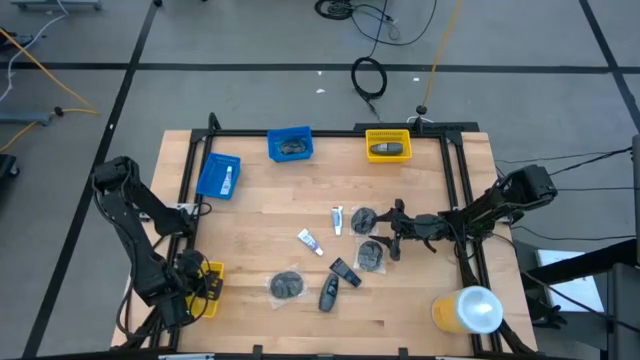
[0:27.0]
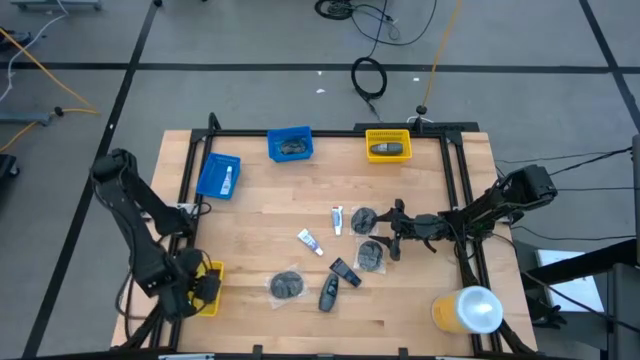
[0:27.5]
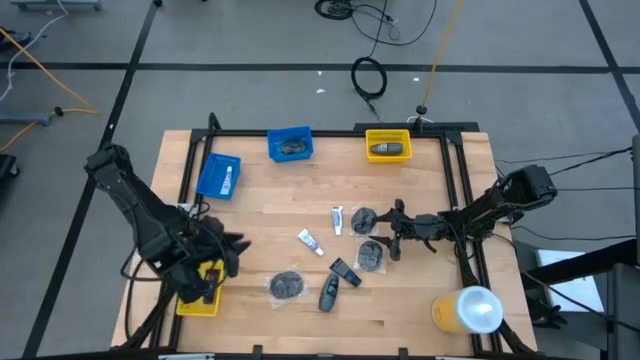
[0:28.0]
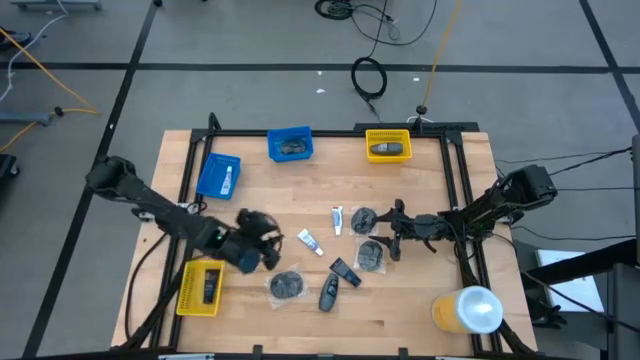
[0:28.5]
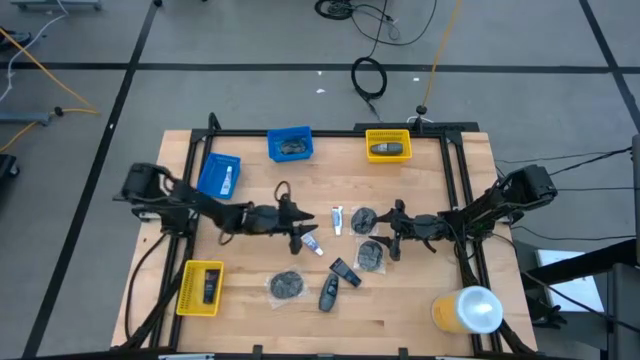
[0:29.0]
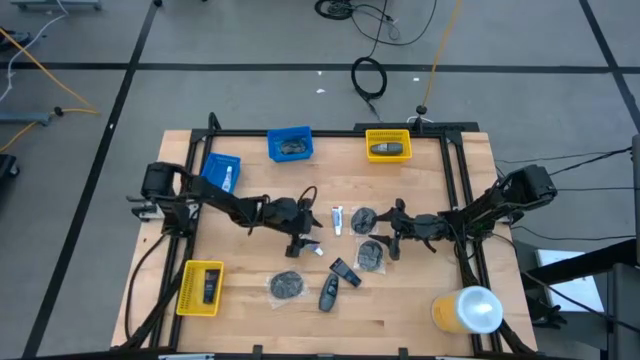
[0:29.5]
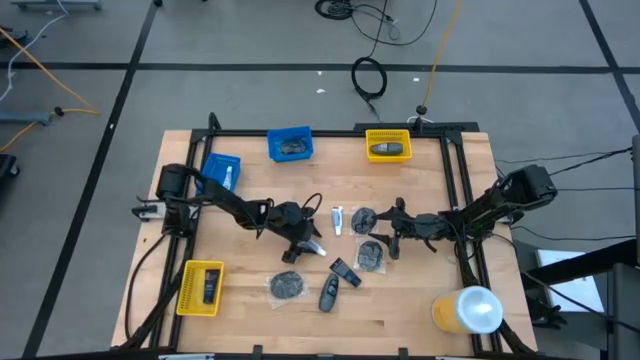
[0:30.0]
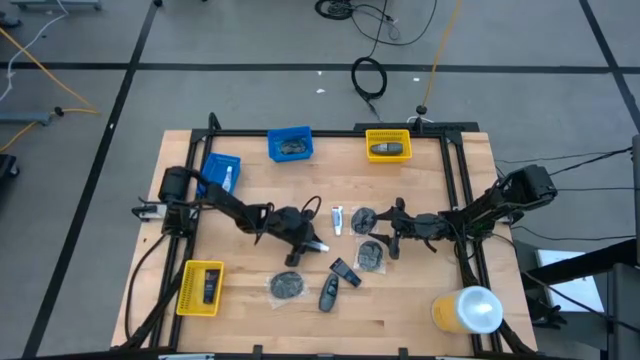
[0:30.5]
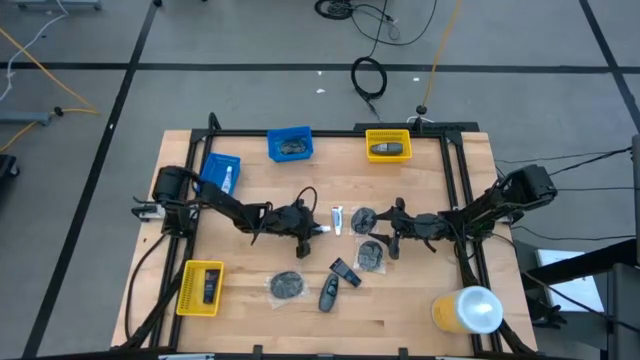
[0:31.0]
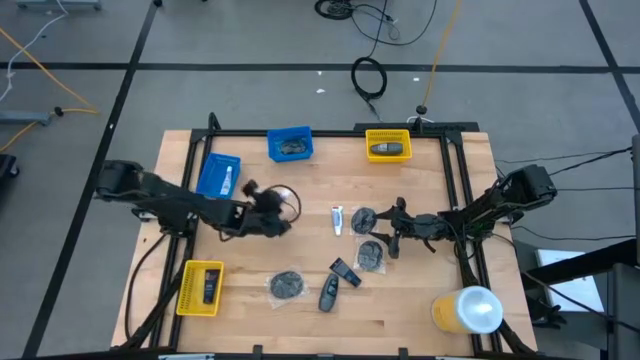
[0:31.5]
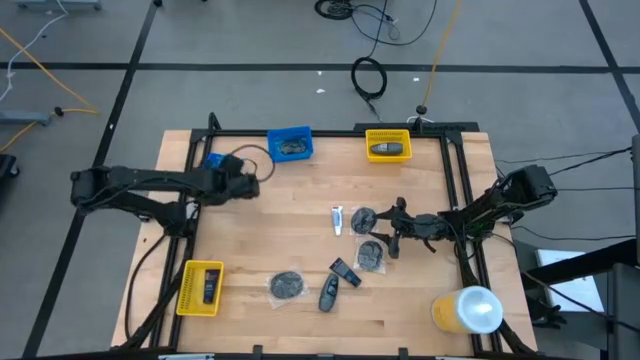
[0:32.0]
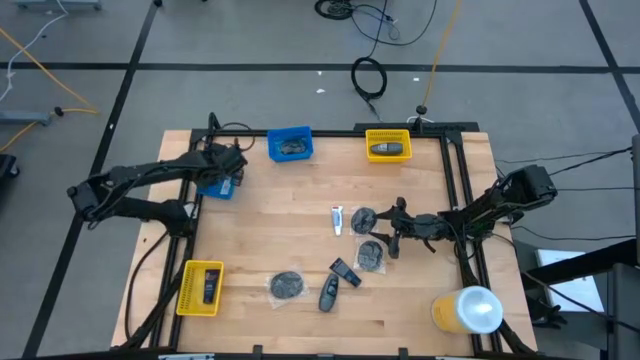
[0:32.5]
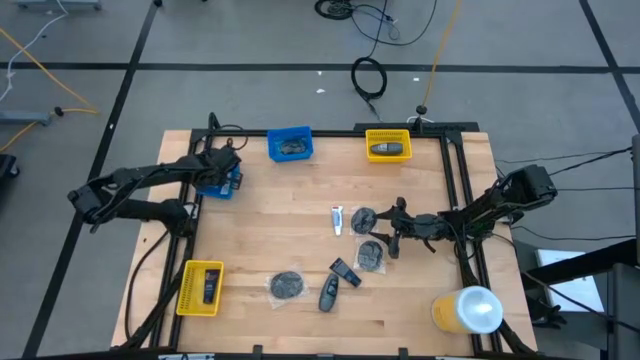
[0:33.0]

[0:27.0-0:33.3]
Task: Pick & Place Travel size toiletries
Put the white toothpaste into the left blue bin

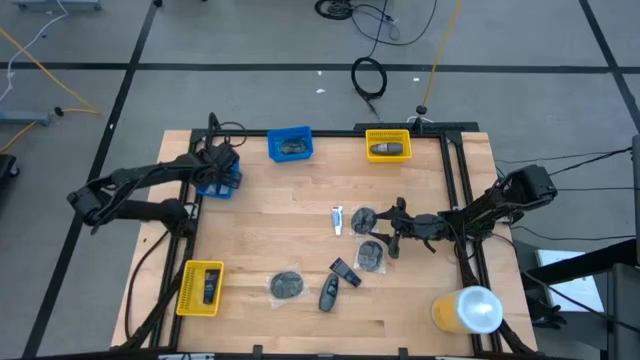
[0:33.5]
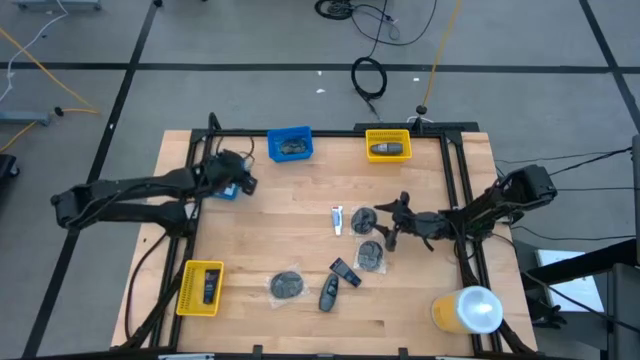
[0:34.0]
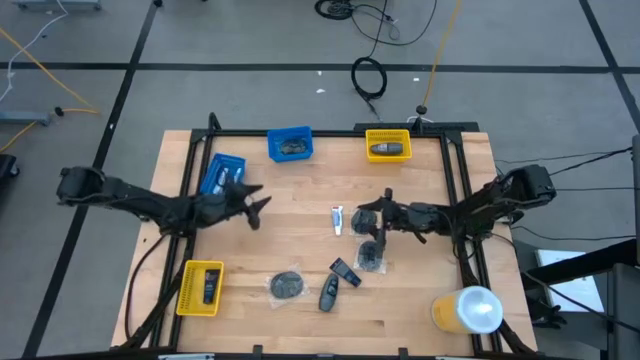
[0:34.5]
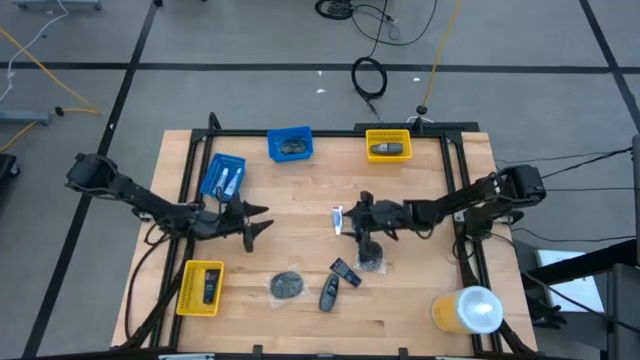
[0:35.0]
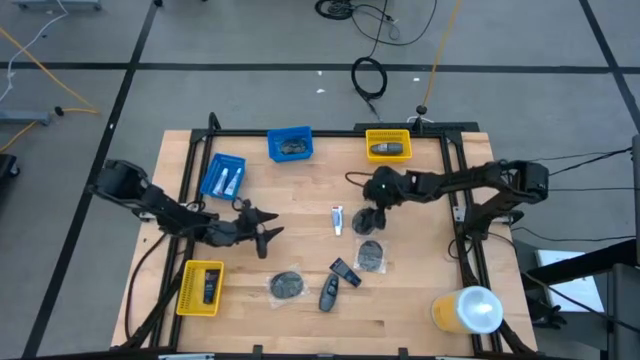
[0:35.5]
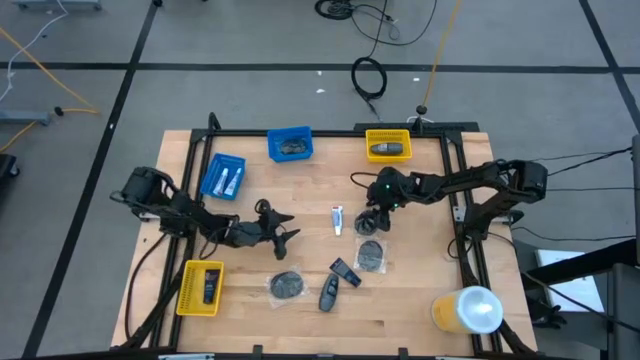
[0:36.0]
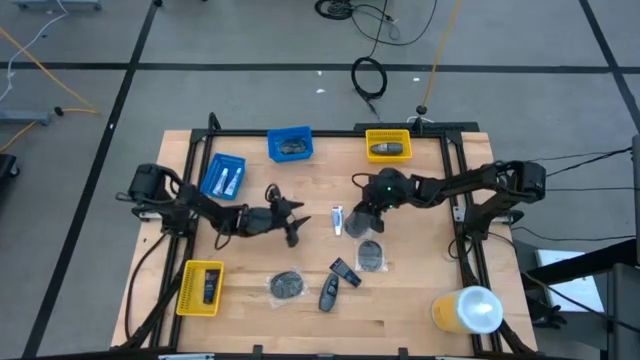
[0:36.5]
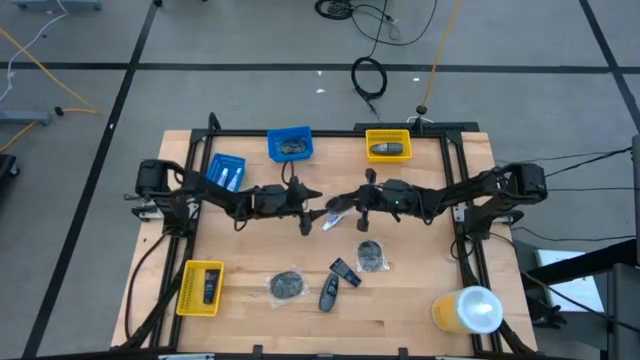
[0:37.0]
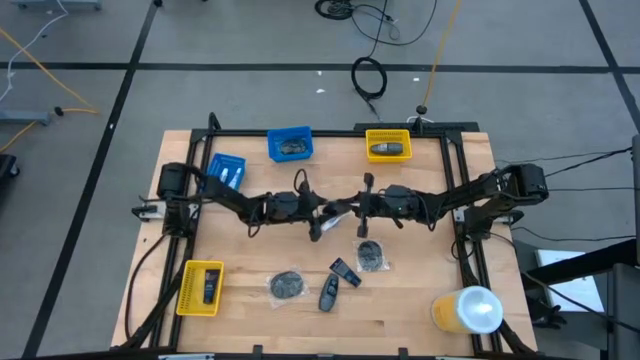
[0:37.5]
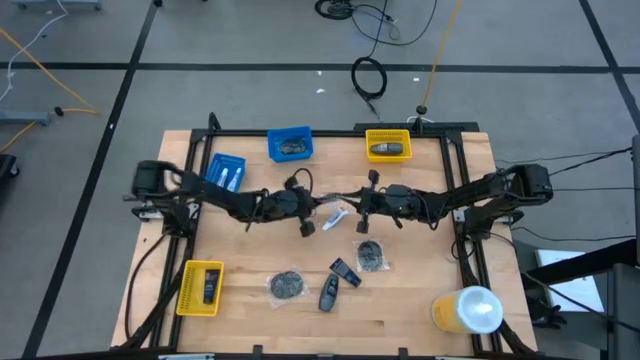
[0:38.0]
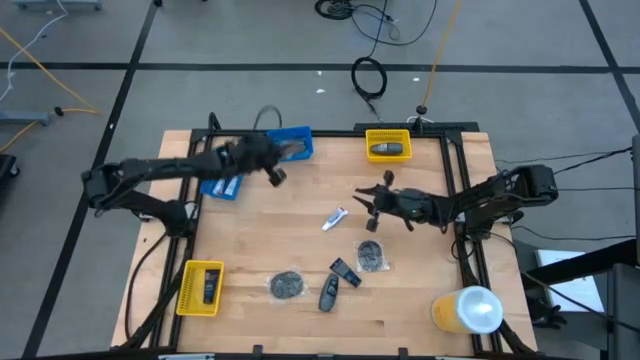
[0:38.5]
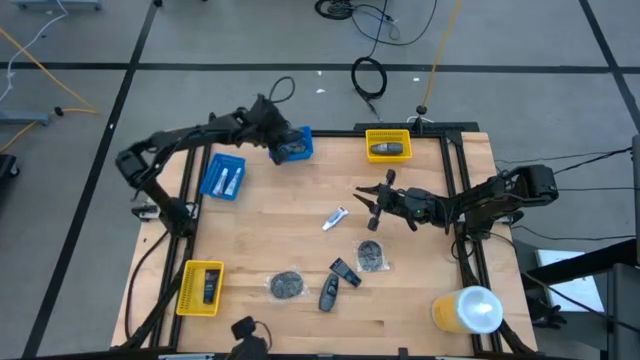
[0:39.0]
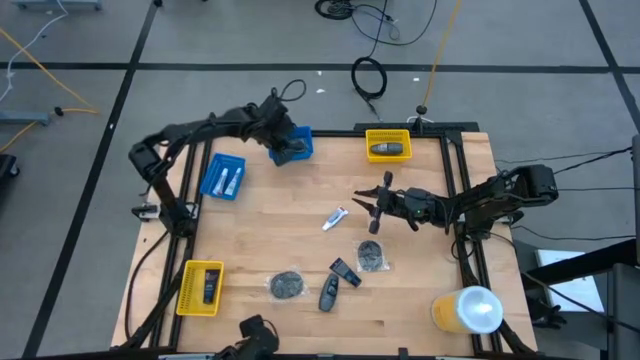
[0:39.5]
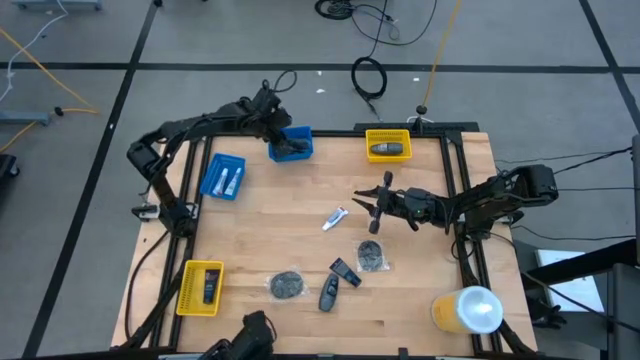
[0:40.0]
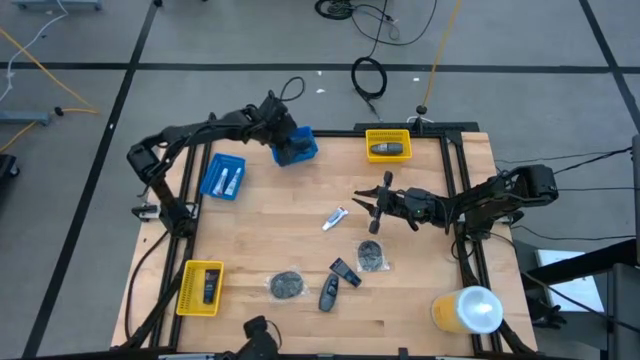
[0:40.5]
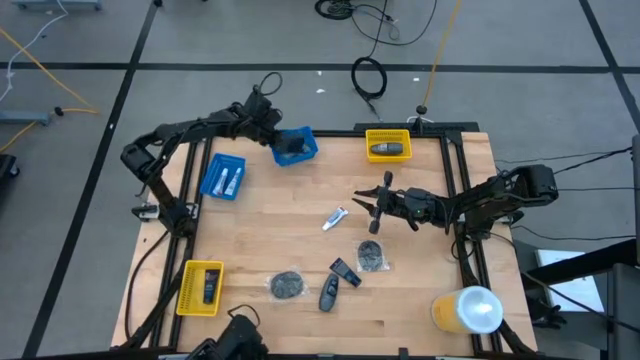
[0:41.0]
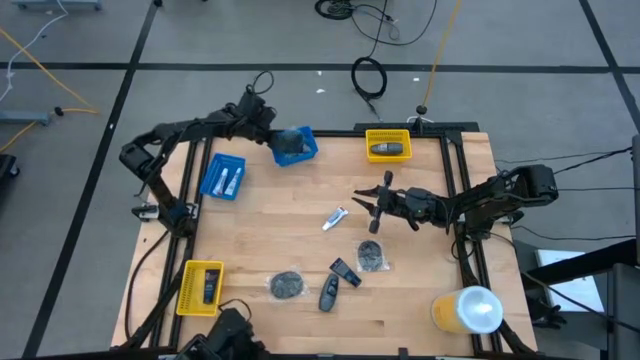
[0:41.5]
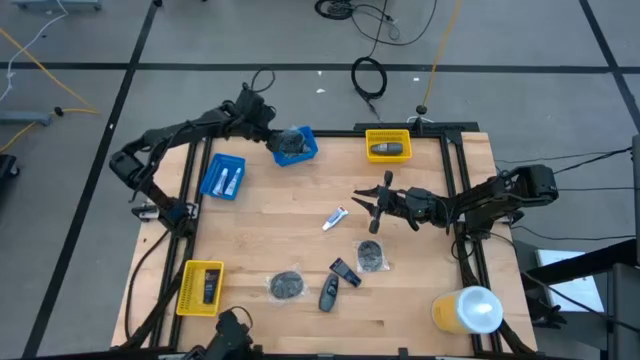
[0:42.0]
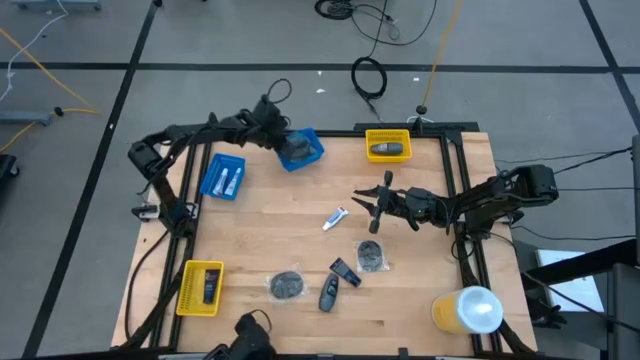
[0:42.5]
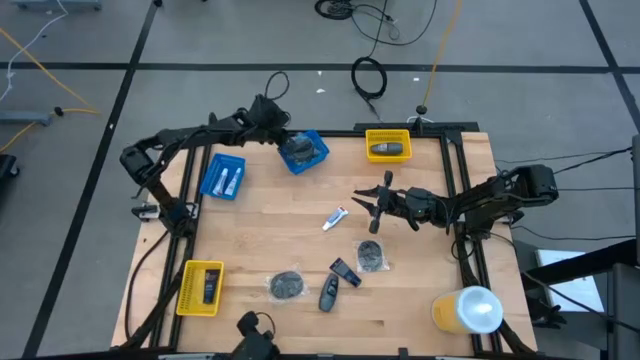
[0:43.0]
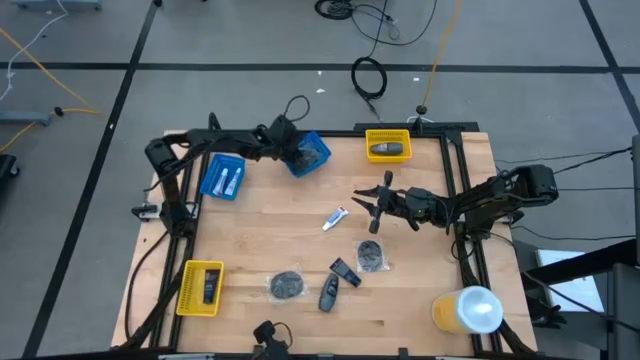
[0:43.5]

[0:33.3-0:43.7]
Put the black hairbrush into the right blue bin

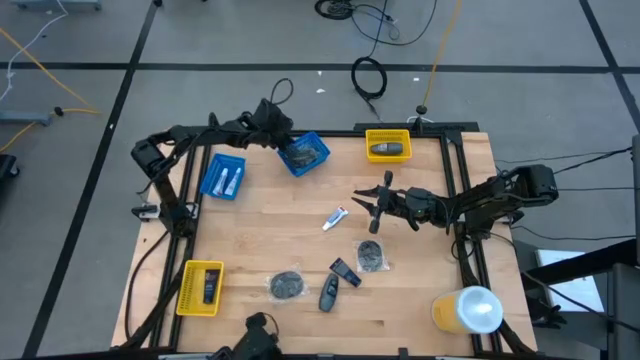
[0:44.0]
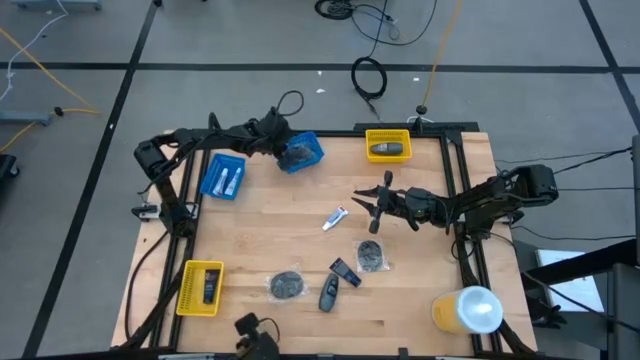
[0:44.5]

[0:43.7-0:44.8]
Adjust the right blue bin

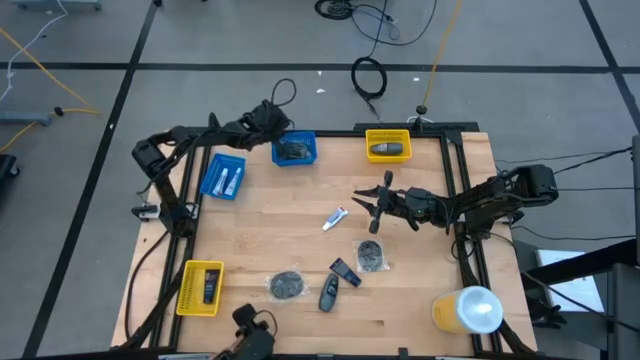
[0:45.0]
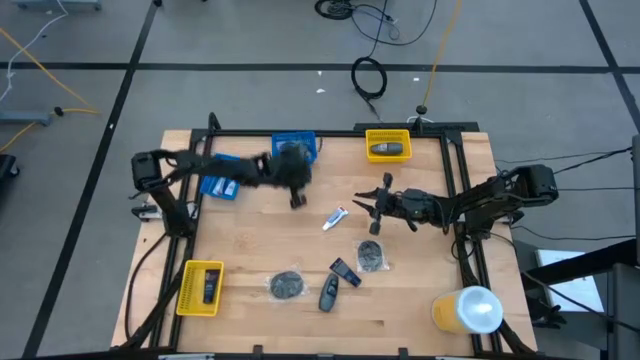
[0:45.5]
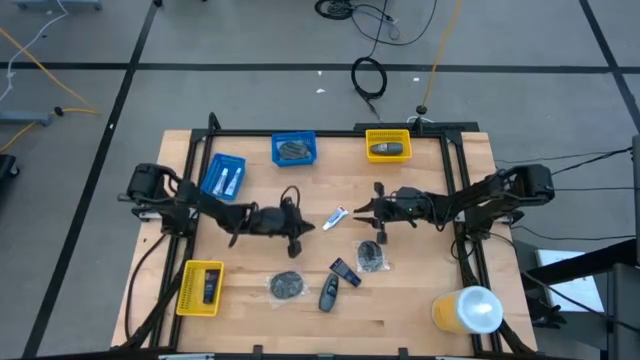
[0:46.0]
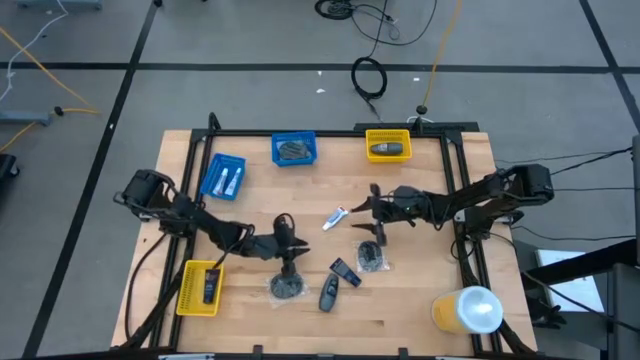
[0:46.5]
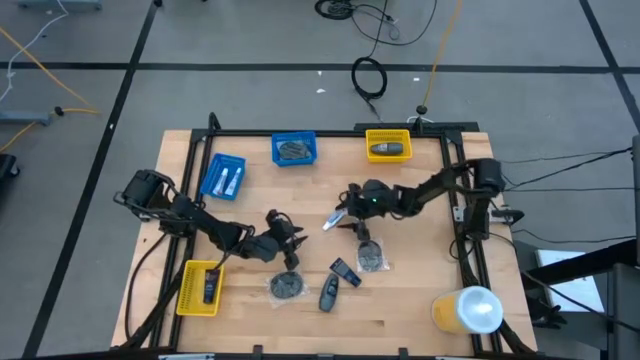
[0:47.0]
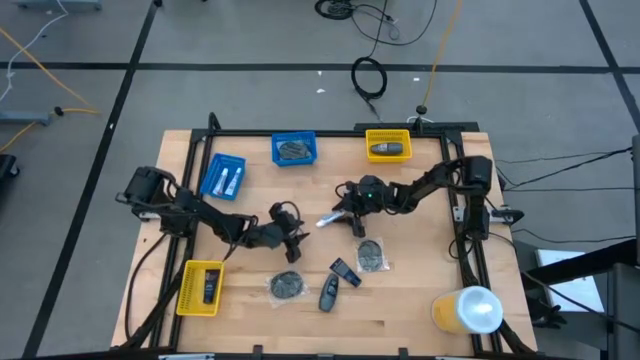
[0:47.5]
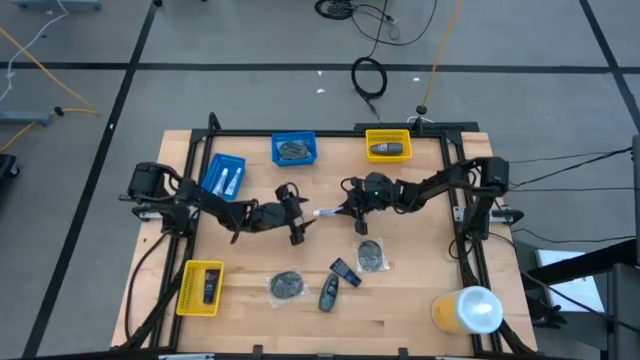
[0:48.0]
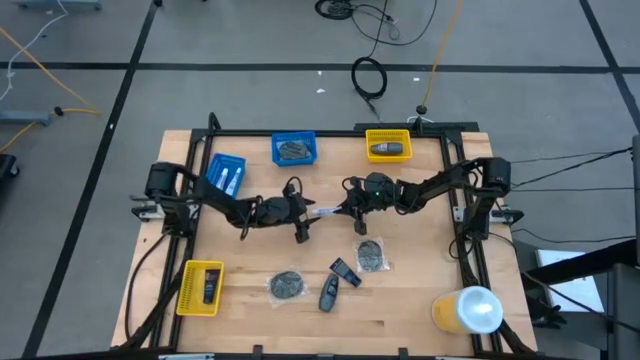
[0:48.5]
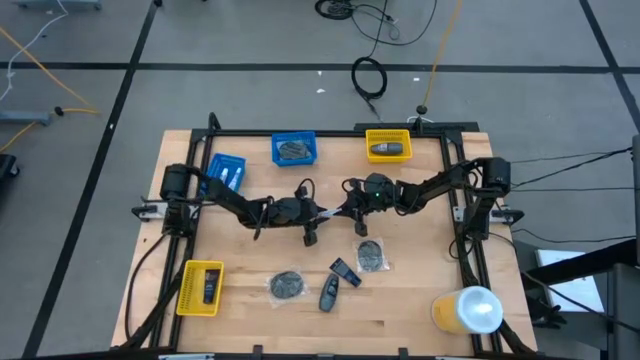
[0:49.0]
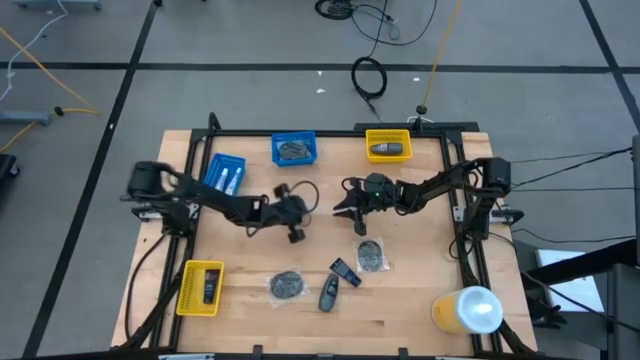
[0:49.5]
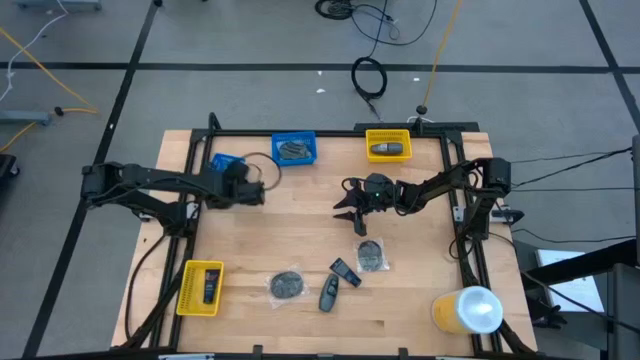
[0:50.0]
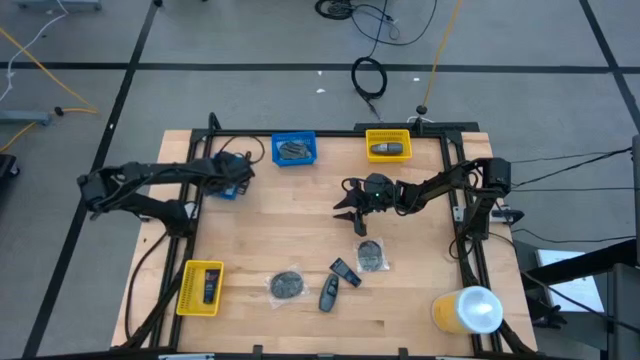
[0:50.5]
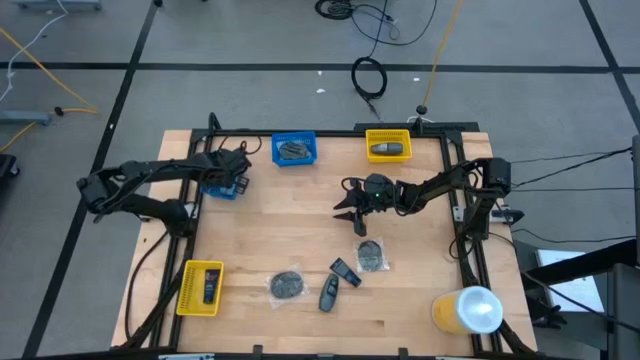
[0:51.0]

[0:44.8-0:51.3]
Put the white toothpaste into the left blue bin
